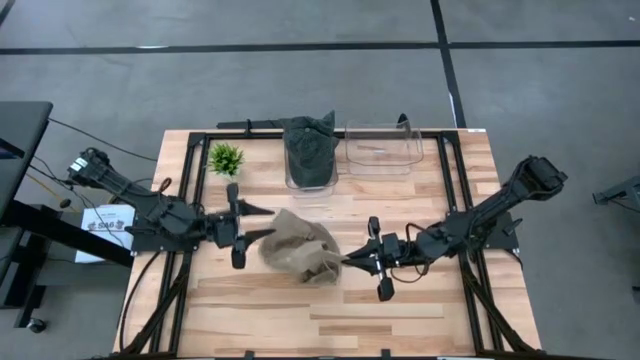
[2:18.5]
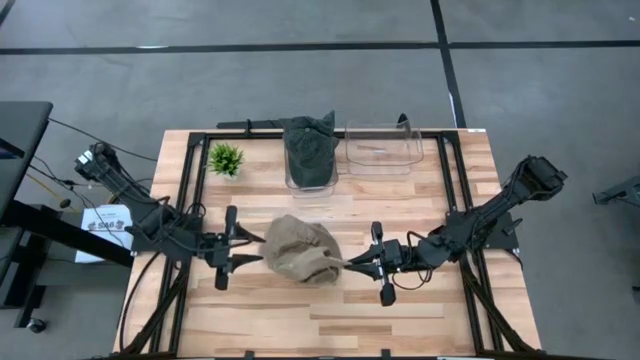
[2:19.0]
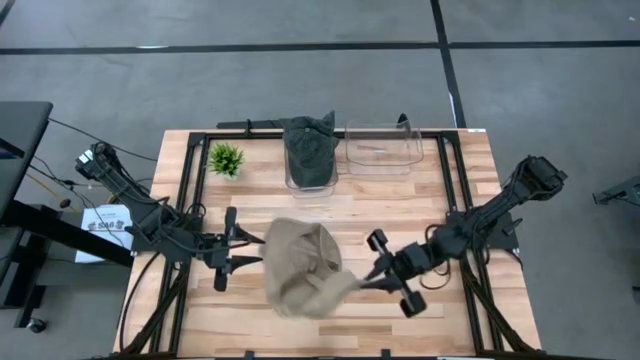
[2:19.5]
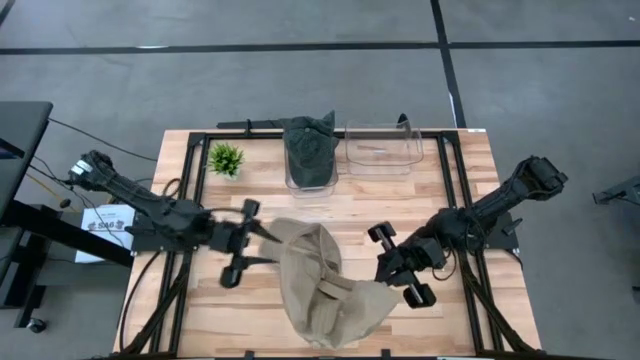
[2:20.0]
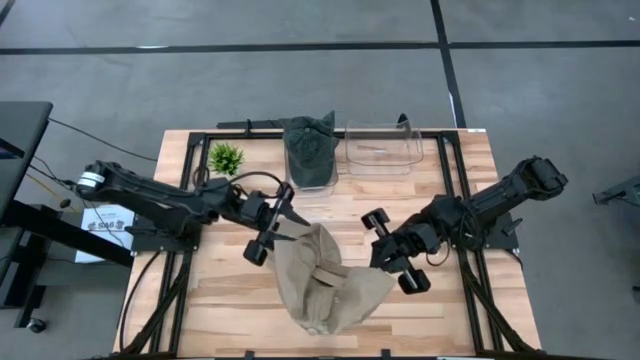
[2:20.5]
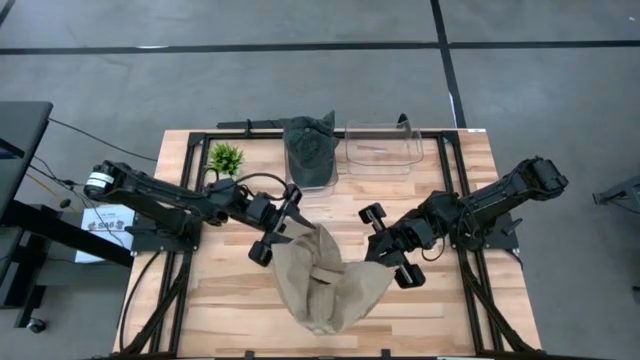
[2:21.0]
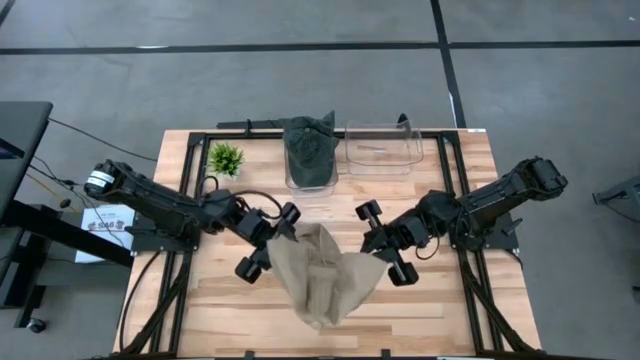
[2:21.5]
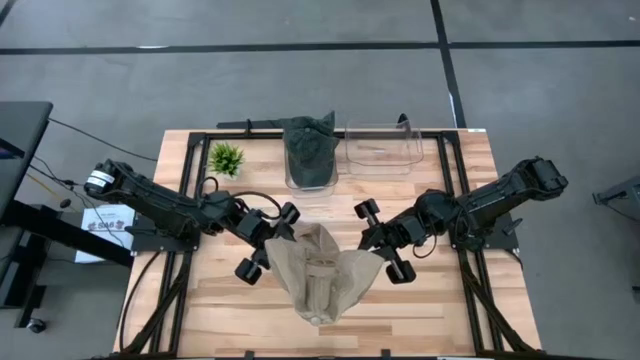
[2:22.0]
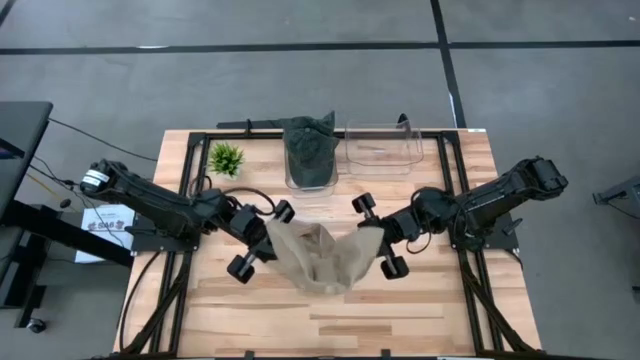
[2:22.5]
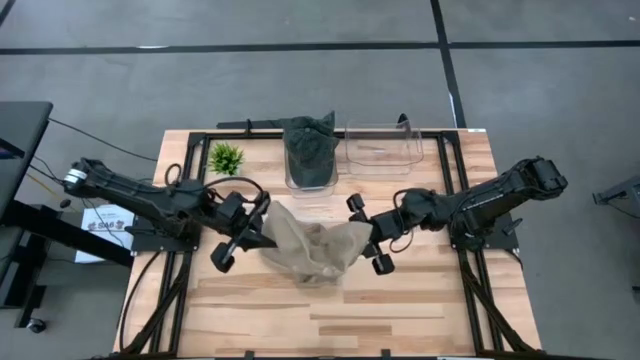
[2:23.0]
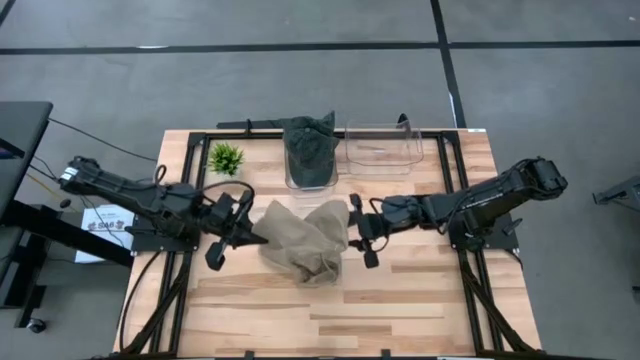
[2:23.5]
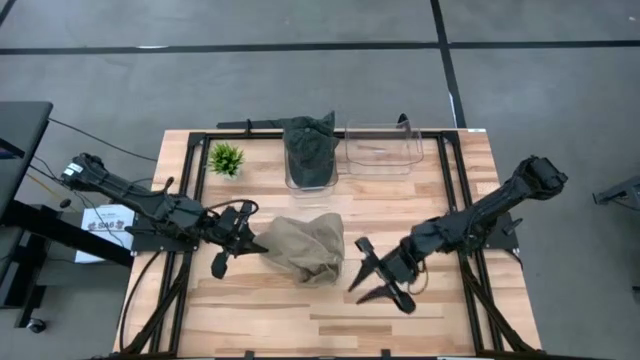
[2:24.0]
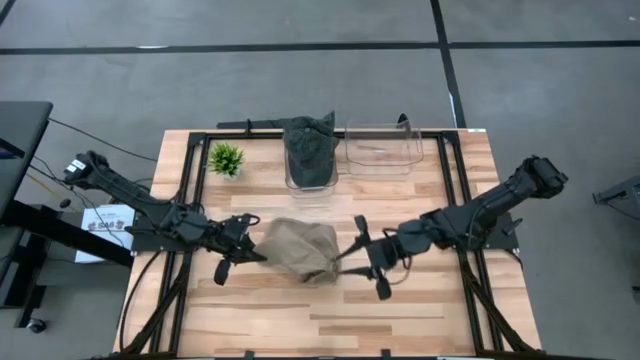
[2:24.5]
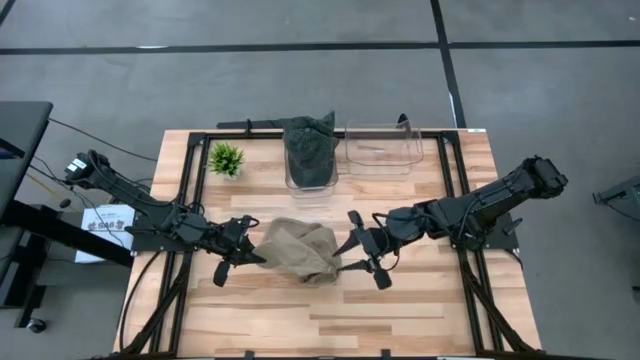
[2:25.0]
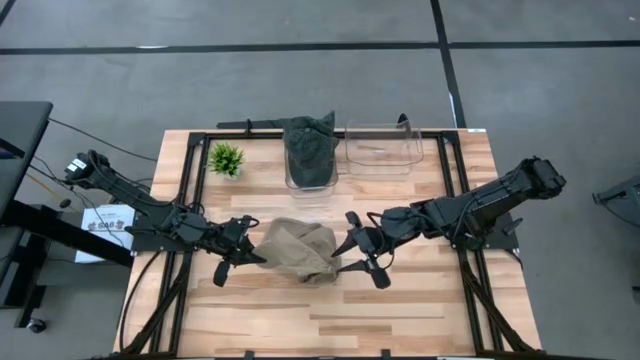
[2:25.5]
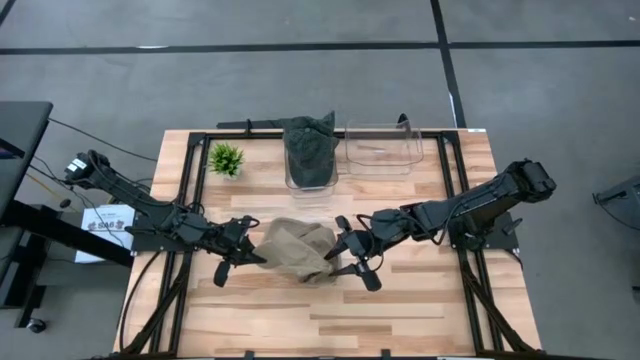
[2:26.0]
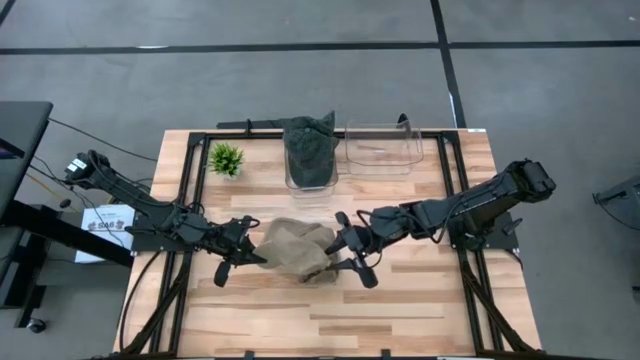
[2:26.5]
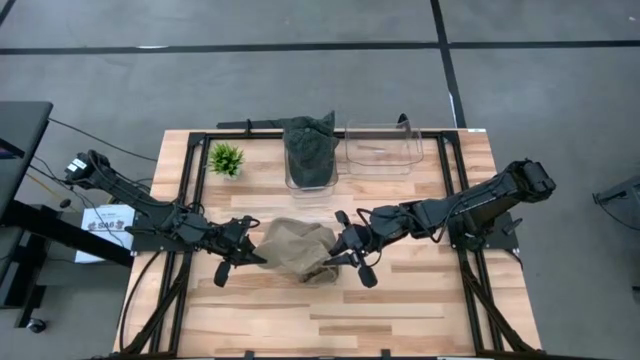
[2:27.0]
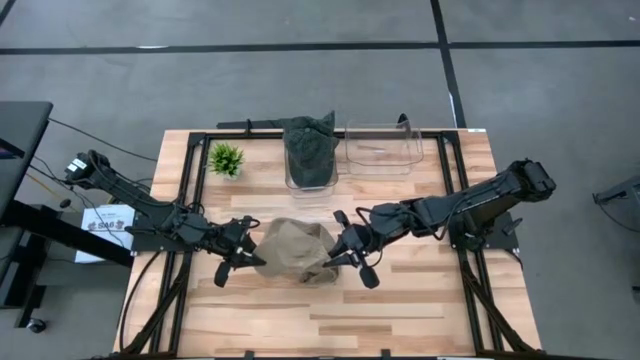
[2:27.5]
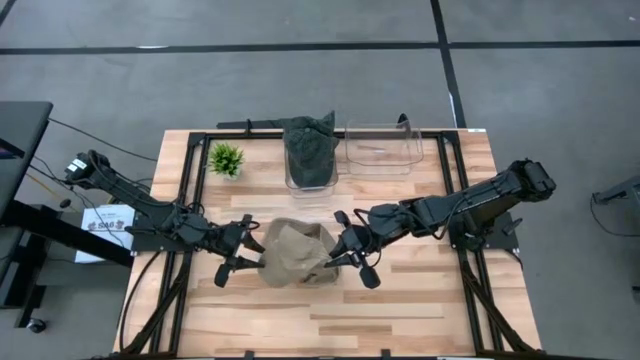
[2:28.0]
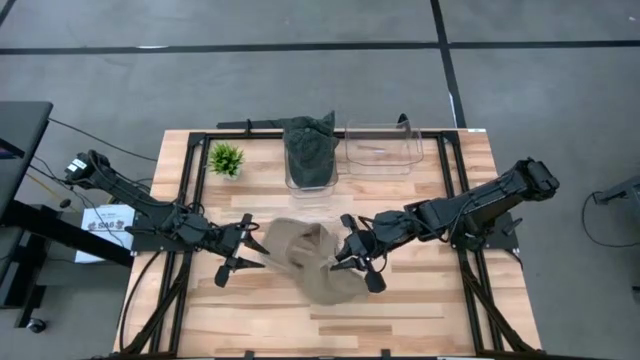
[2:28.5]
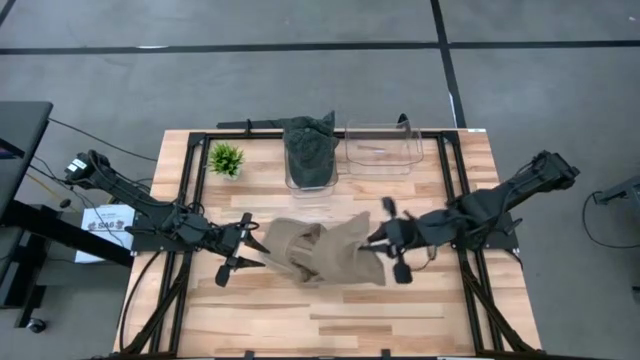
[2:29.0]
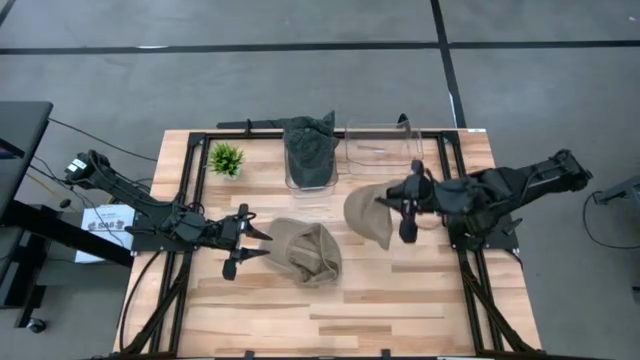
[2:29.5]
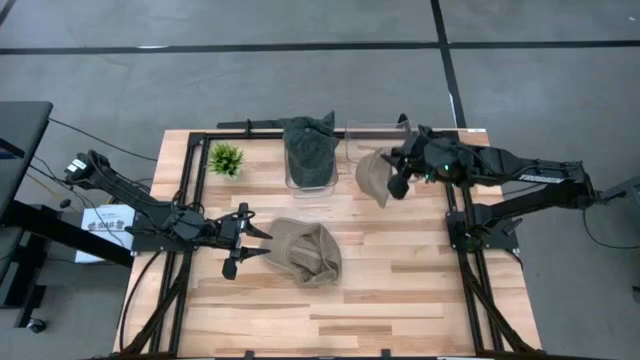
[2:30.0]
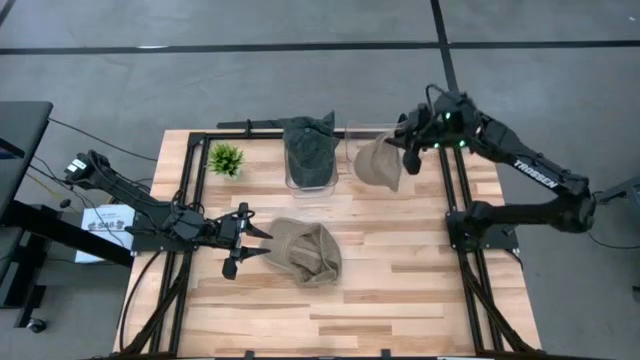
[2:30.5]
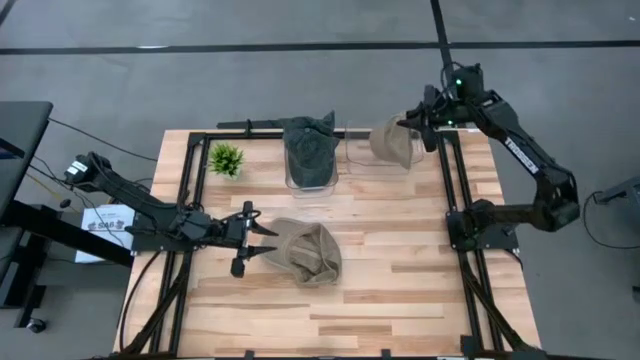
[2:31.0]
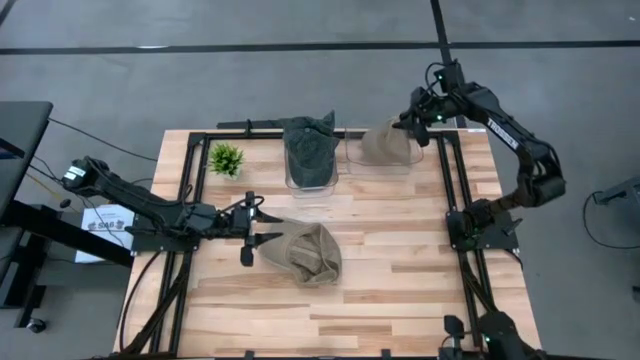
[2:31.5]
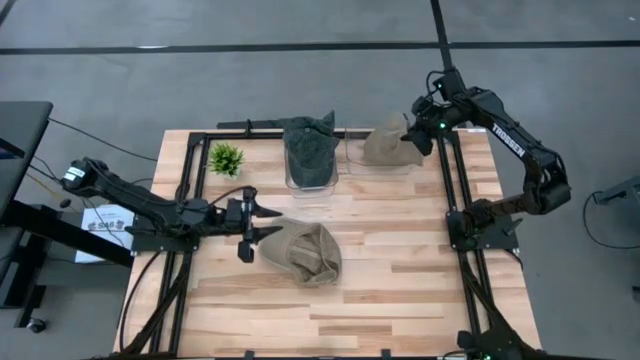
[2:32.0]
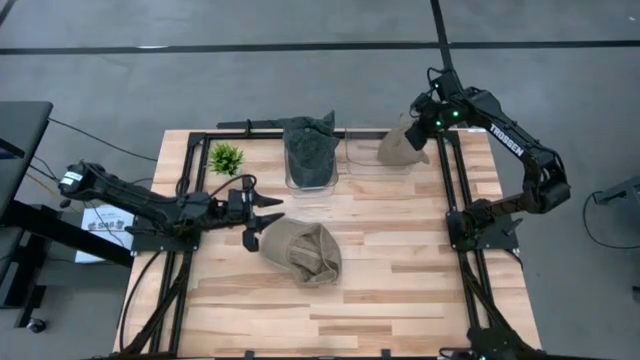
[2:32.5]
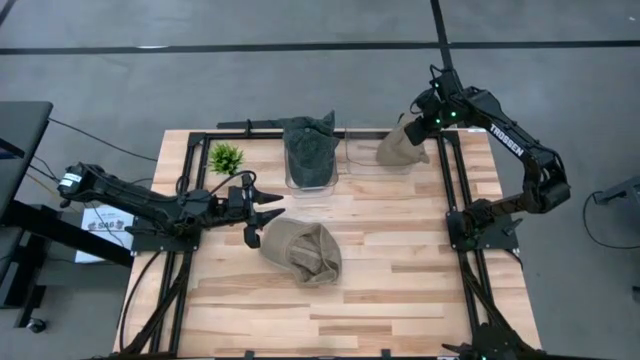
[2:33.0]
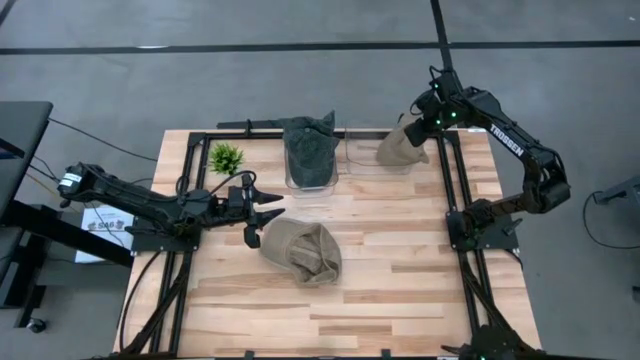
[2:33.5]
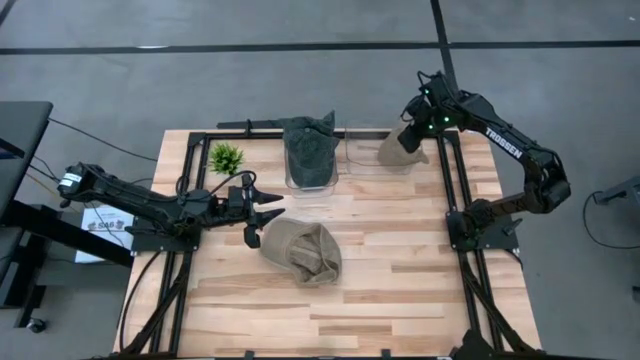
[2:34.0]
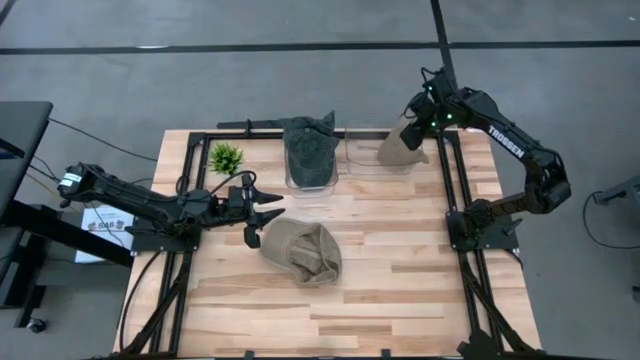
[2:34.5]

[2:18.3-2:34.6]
Task: Pick & Place hat
Put the brown cap into the right transparent bin

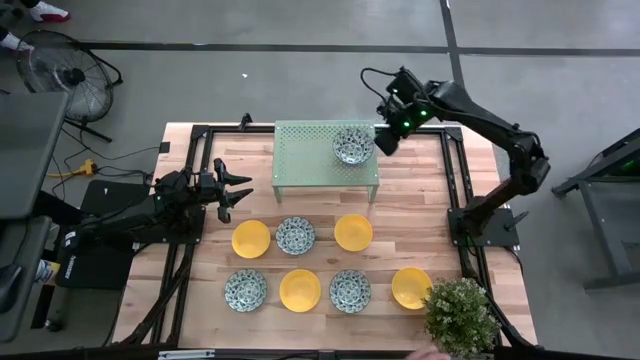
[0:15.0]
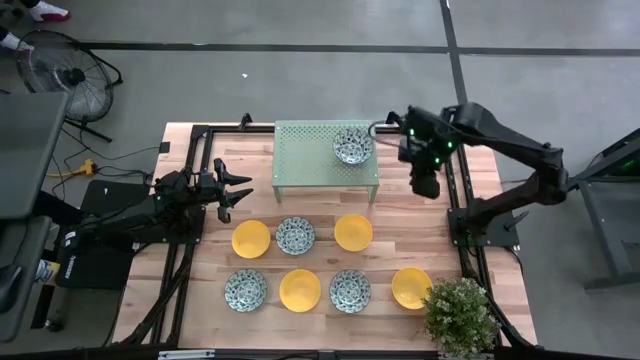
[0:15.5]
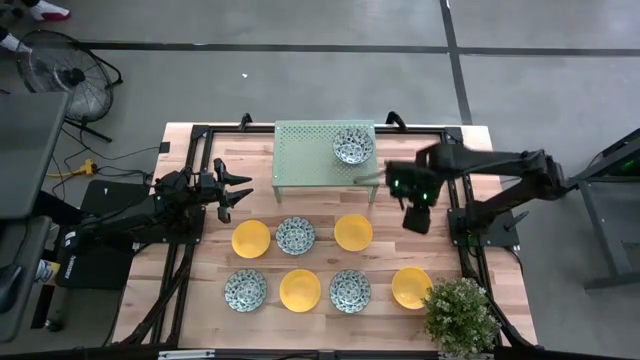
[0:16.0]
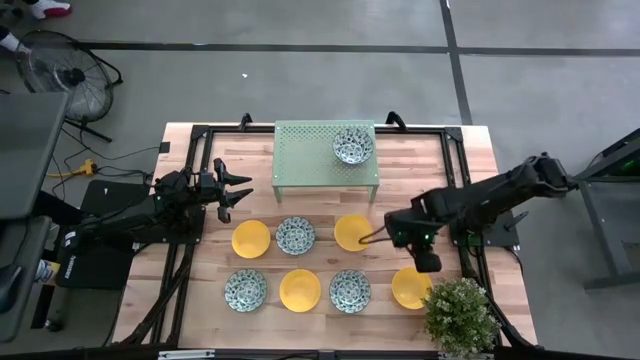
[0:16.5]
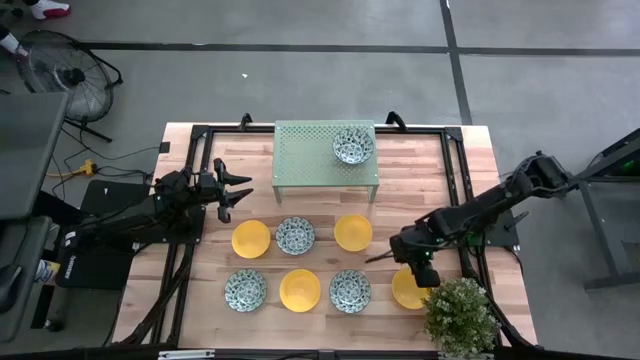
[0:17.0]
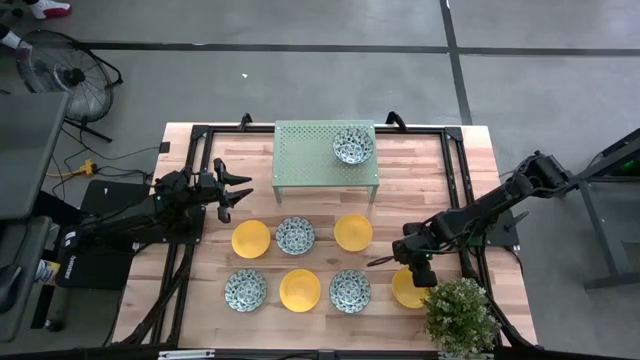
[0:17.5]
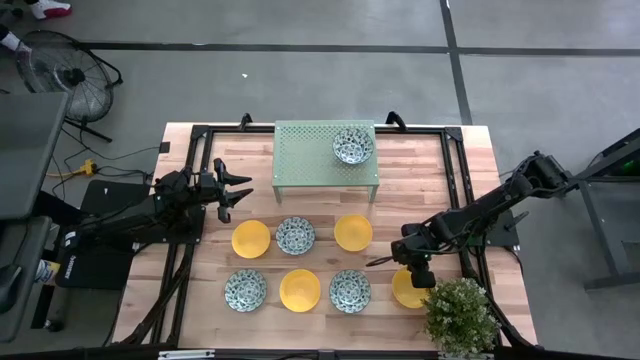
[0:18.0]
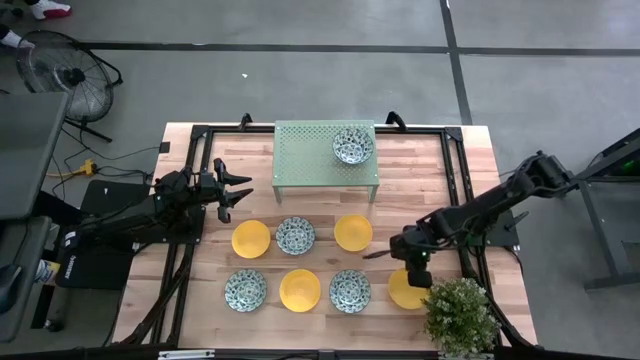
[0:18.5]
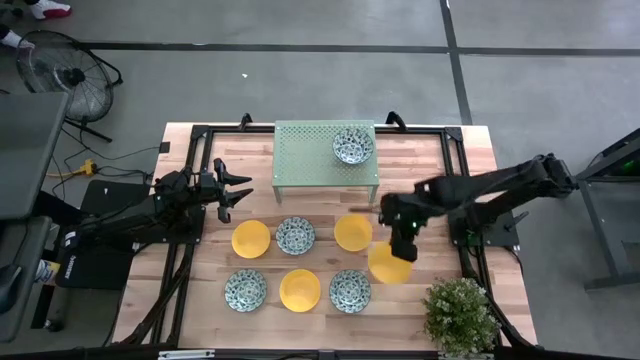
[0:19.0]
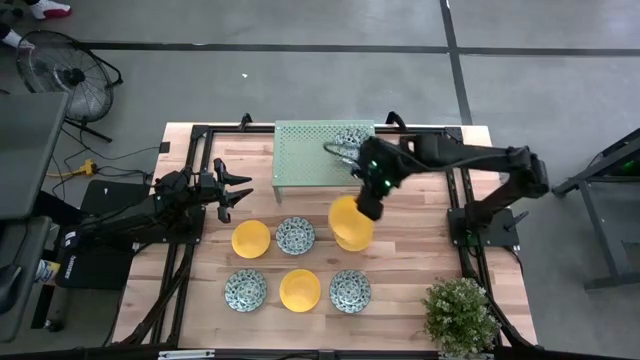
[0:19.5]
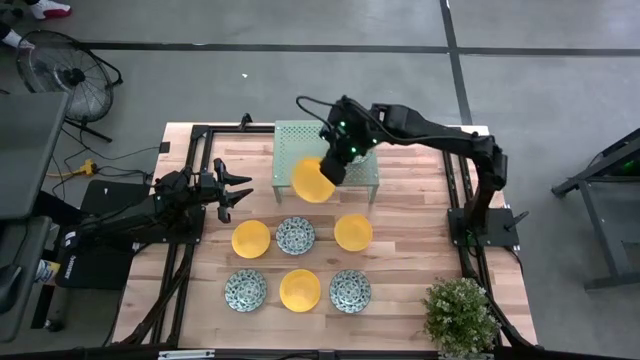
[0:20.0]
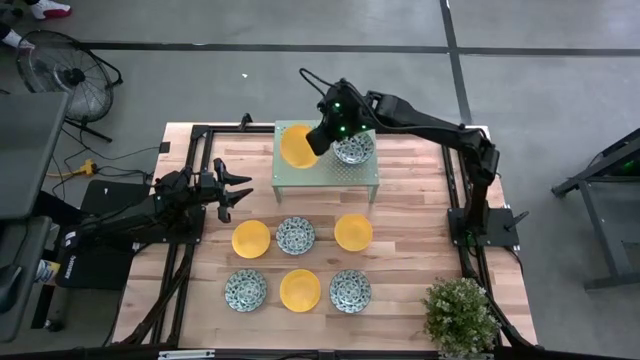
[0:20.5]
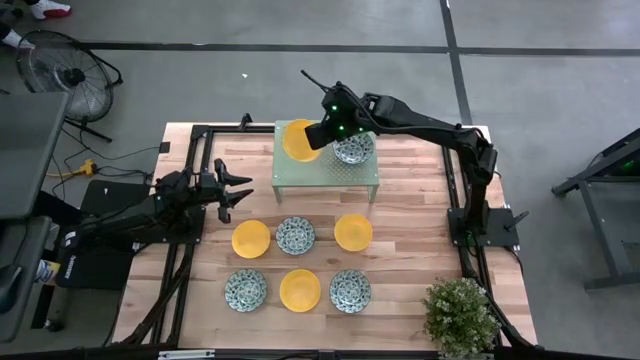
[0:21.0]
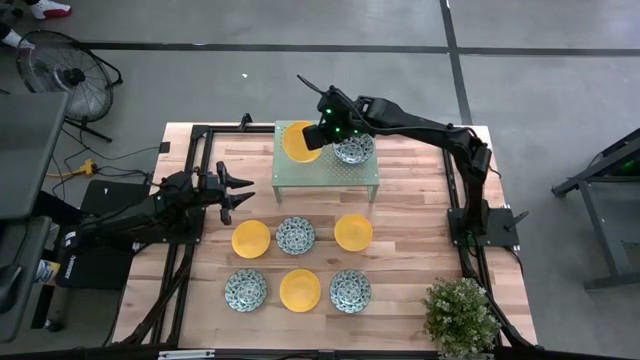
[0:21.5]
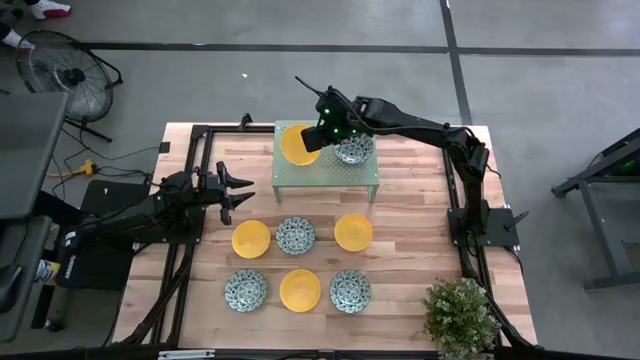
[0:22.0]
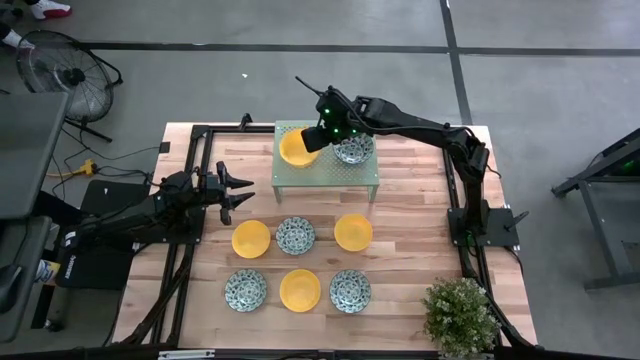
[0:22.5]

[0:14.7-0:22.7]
Task: Pick & Place Mini bowls
Put the yellow bowl on the shelf
